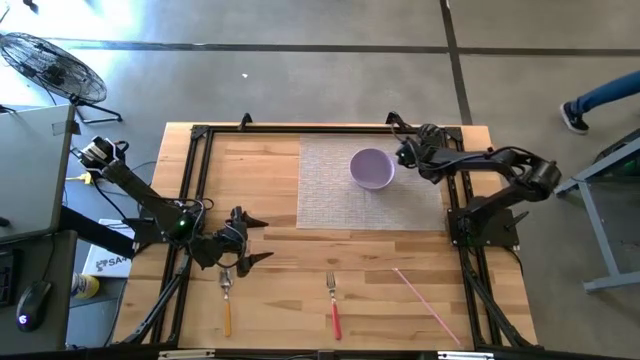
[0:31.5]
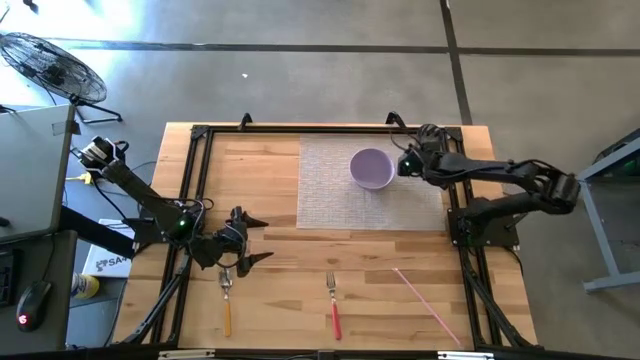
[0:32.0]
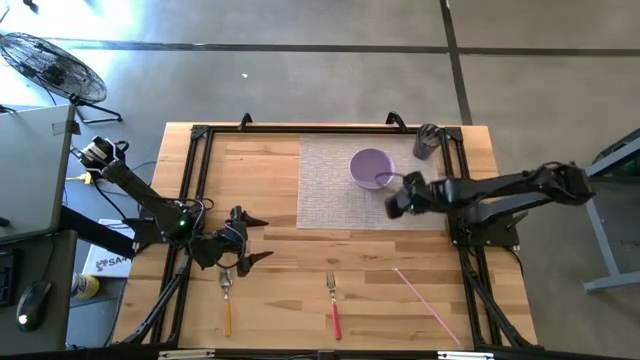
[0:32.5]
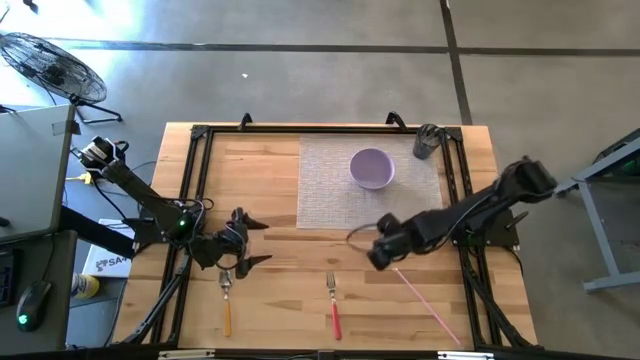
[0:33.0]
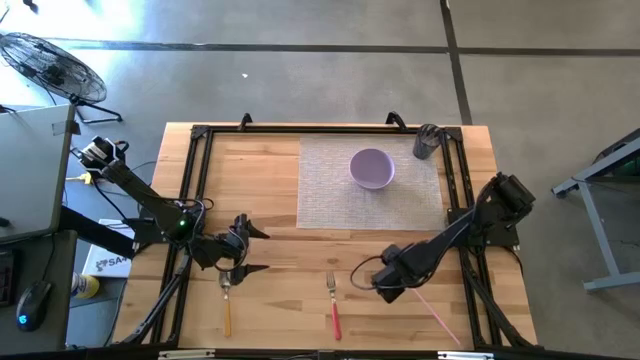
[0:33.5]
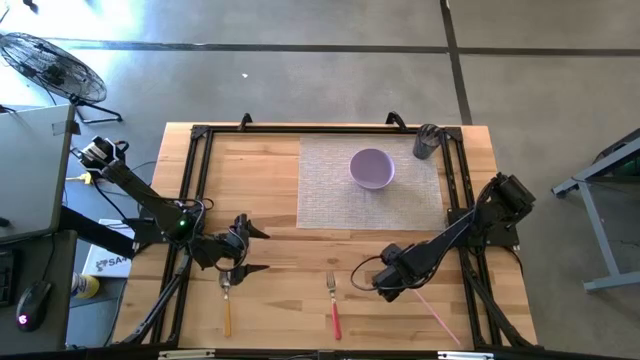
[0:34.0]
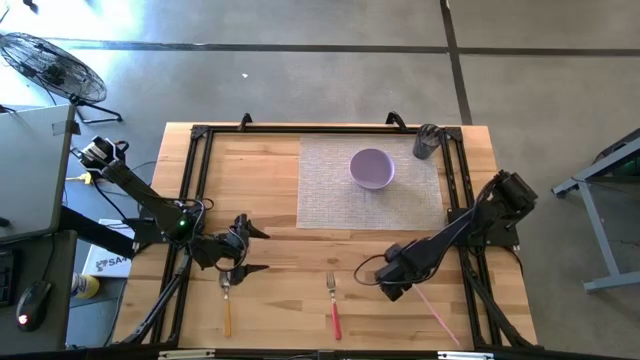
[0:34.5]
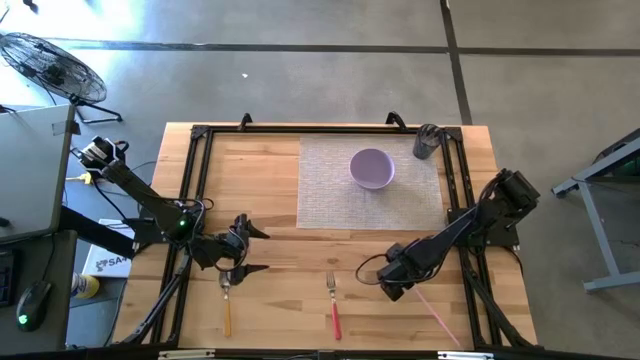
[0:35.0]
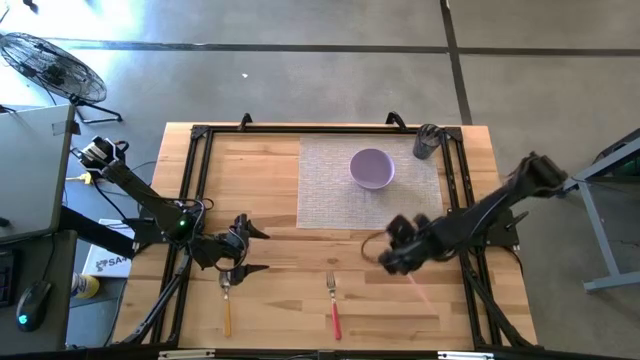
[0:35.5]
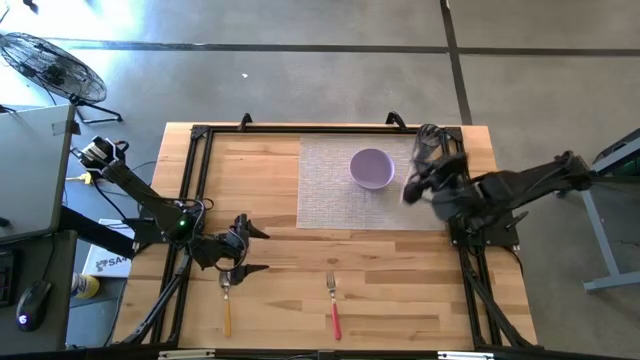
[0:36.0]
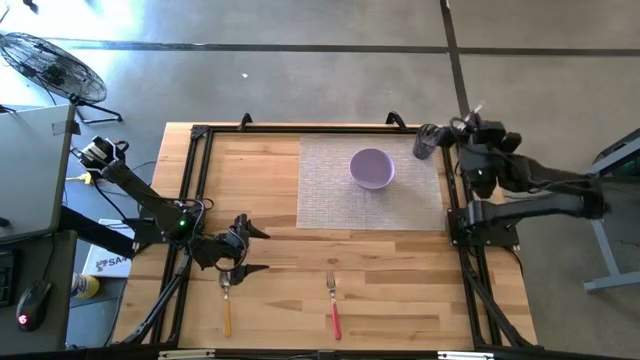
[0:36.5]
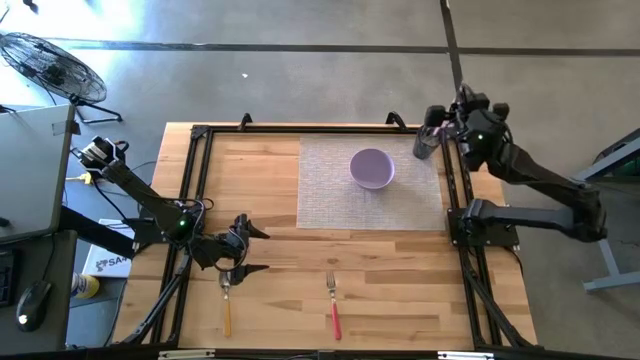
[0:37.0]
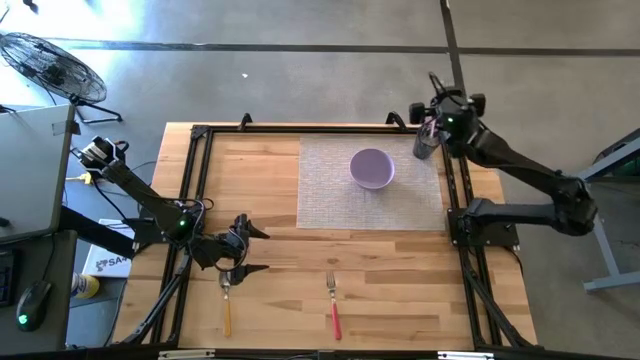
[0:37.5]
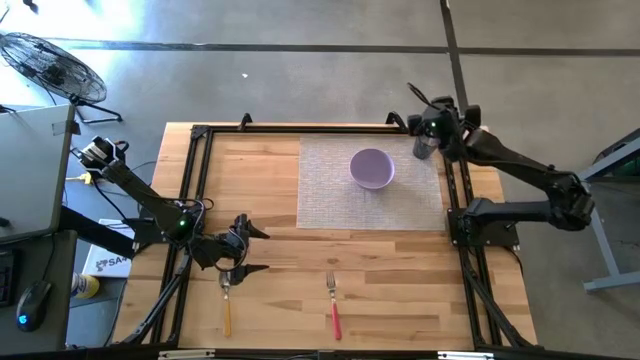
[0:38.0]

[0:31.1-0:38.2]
Task: Pick & Place Utensil
Put the light pink straw into the black cup on the mat

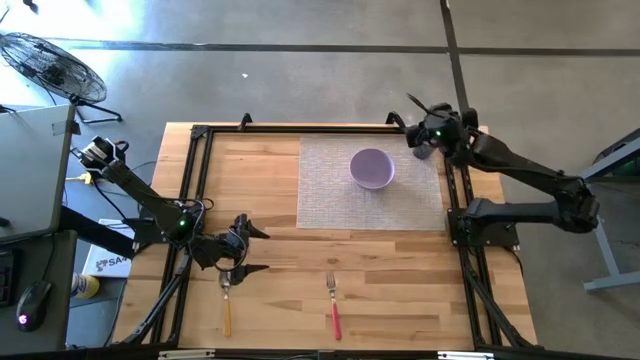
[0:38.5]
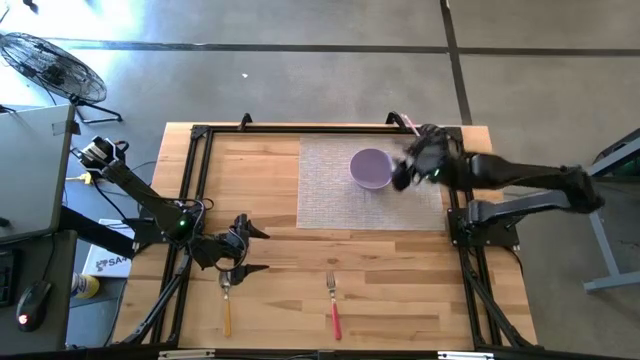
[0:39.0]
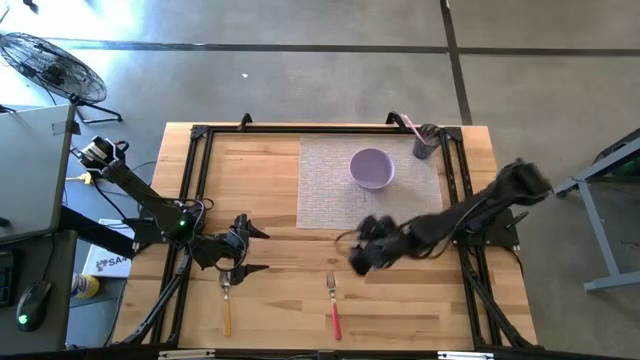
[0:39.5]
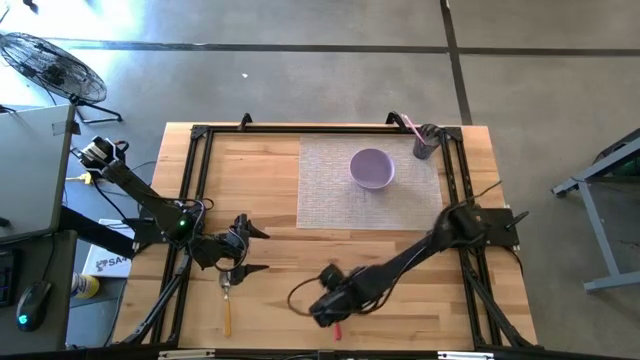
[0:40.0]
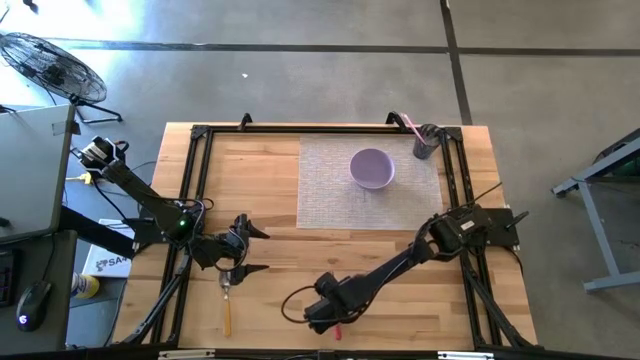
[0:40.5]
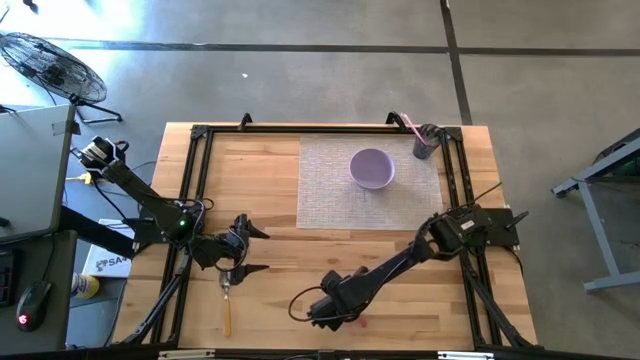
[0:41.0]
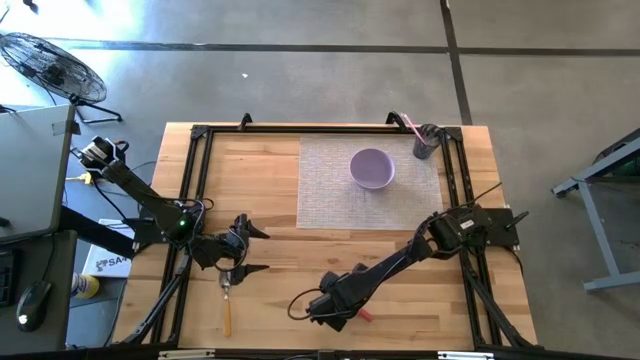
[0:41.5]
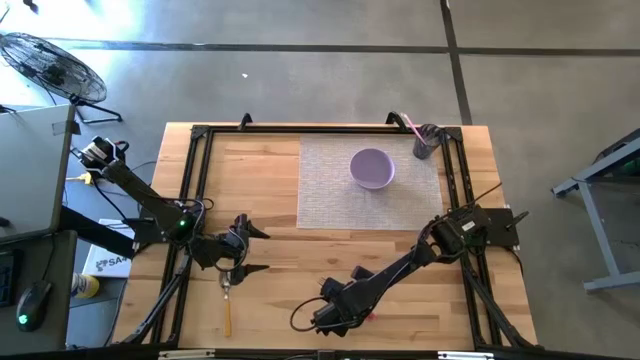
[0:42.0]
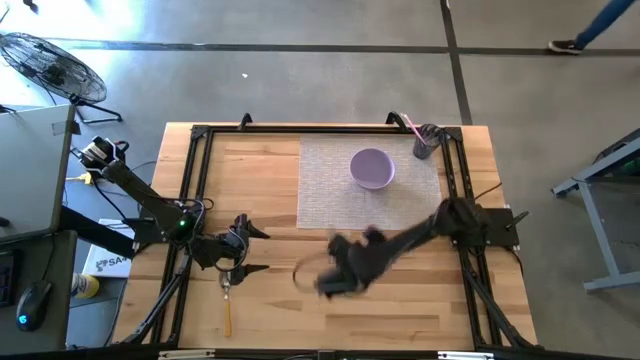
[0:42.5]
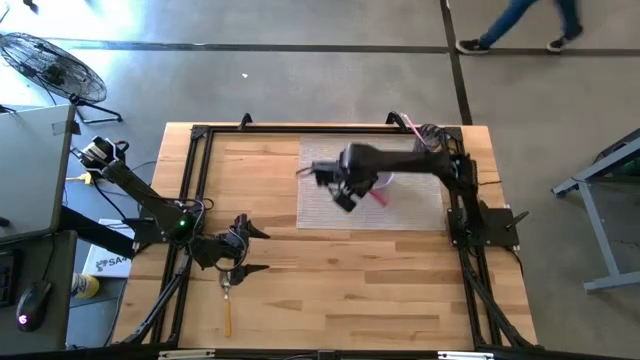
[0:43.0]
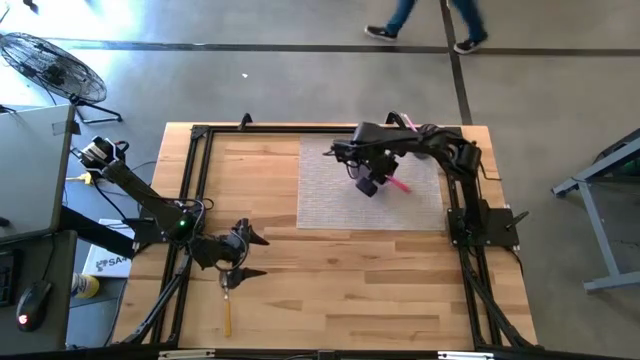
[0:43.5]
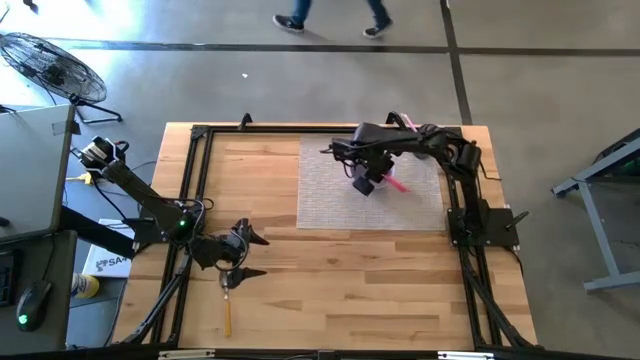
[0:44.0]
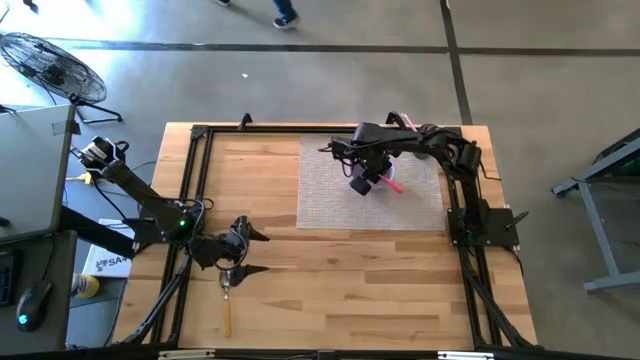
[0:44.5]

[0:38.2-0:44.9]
Put the dark pink fork into the bowl on the mat

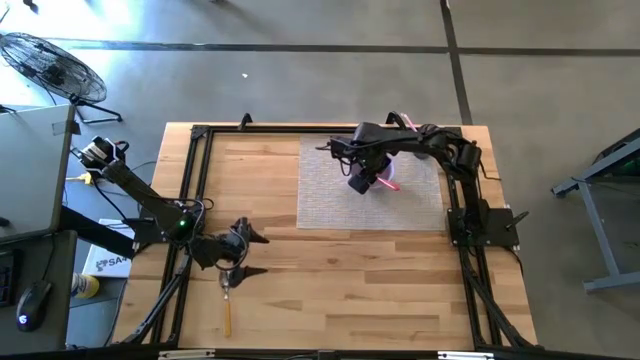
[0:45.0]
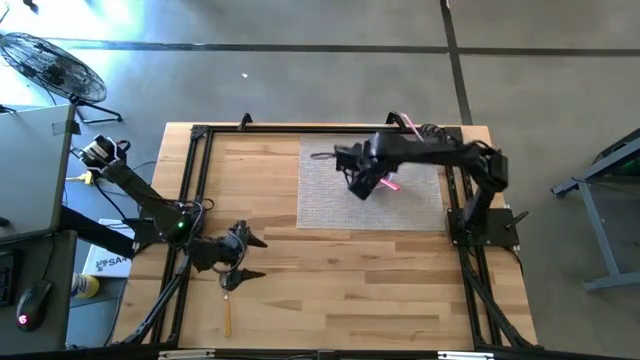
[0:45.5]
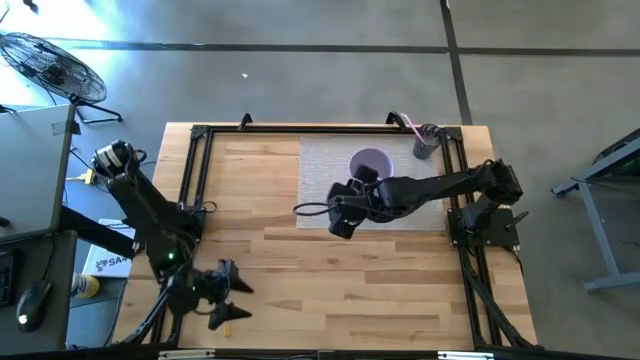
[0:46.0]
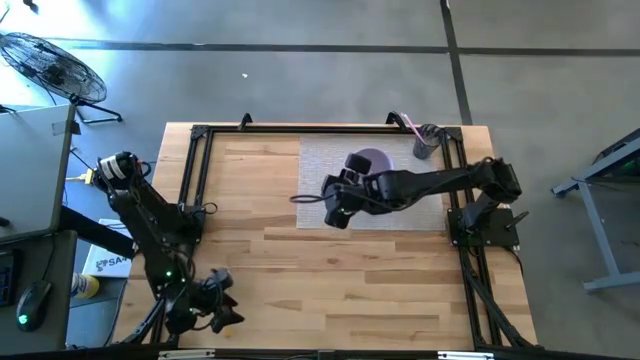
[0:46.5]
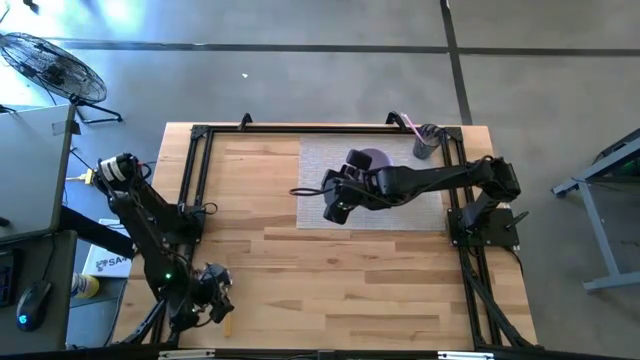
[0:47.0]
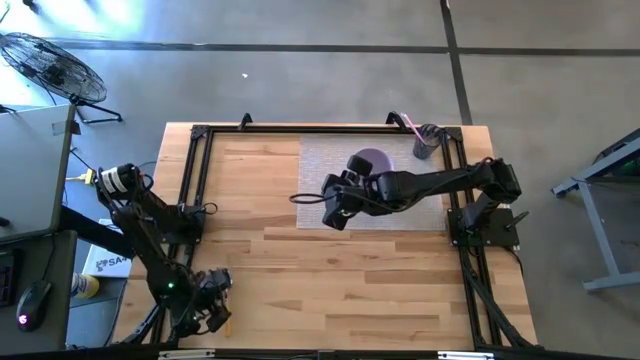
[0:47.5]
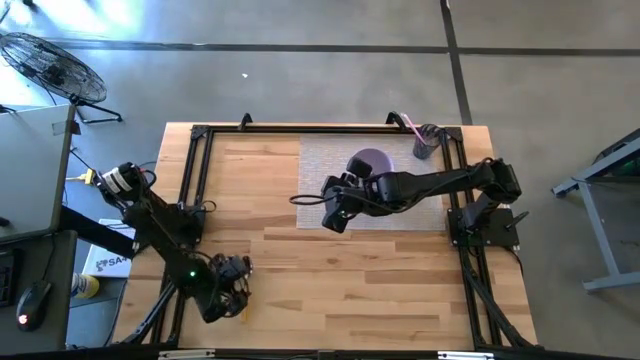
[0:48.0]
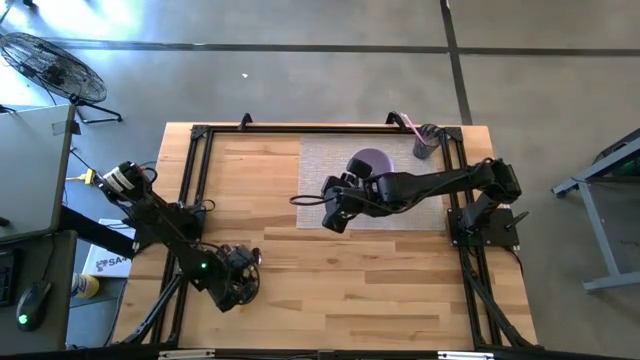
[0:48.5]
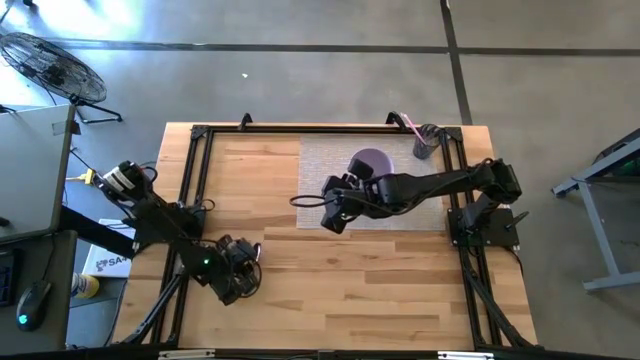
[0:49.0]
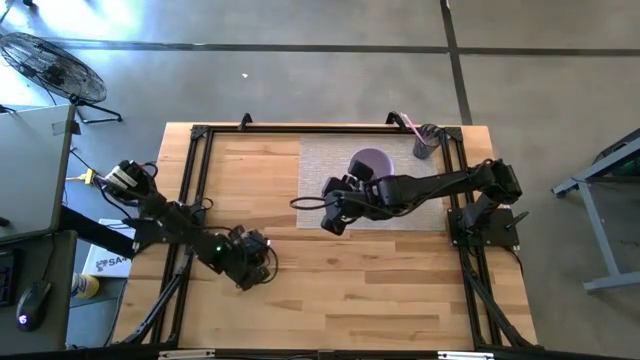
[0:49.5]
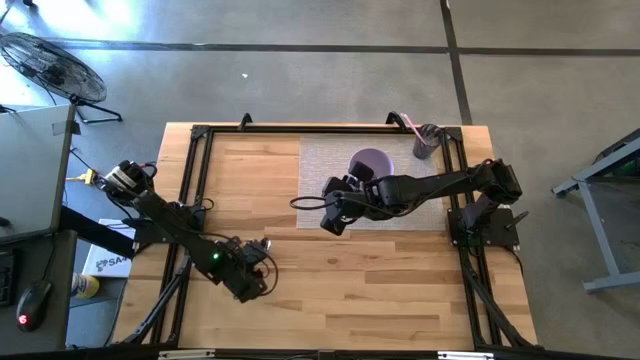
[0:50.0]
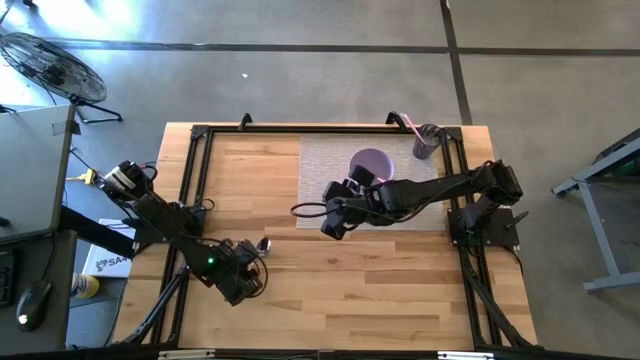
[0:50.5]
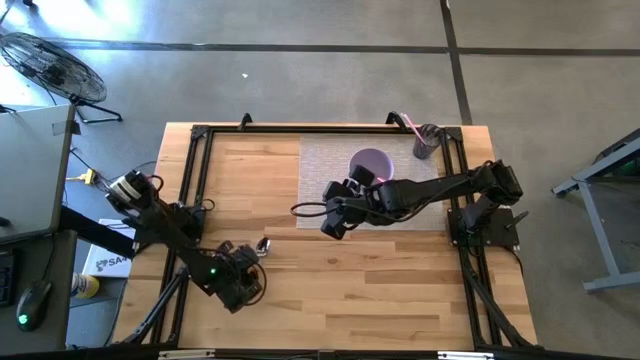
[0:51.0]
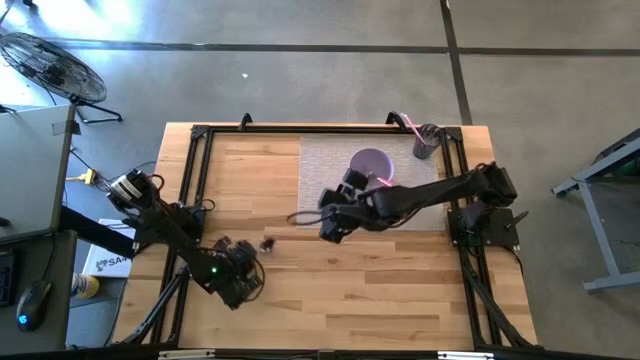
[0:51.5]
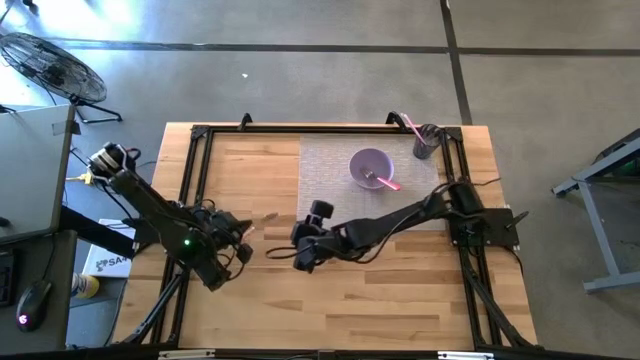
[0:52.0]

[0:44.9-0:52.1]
Put the light brown spoon into the bowl on the mat
